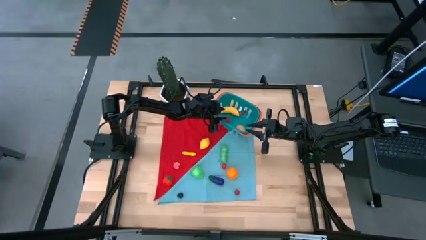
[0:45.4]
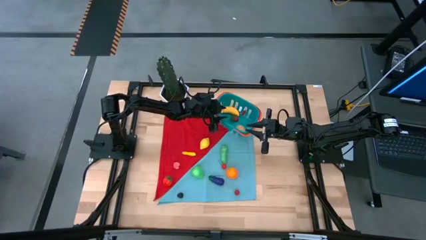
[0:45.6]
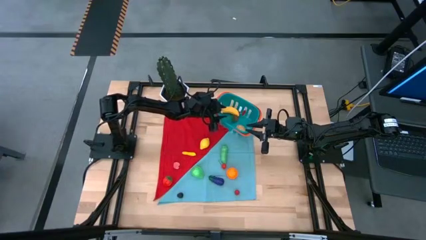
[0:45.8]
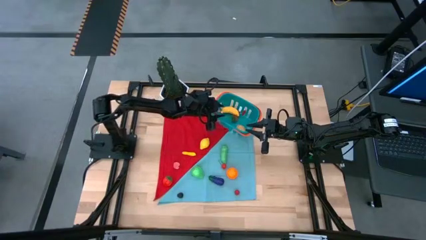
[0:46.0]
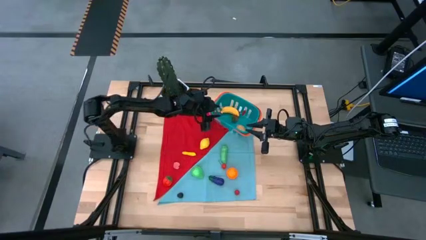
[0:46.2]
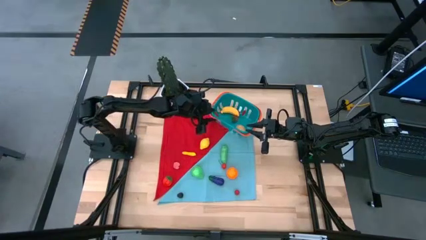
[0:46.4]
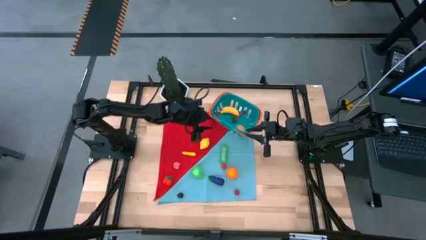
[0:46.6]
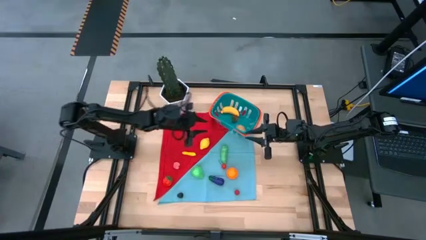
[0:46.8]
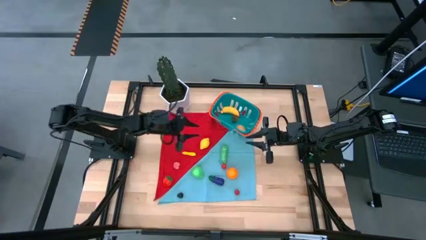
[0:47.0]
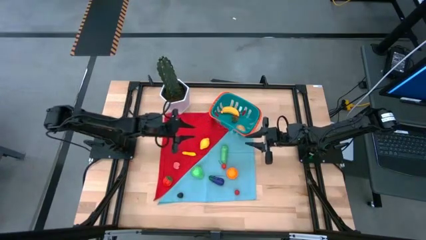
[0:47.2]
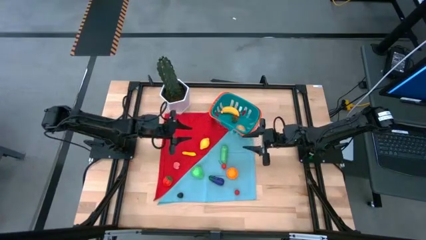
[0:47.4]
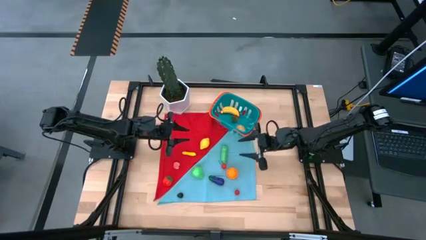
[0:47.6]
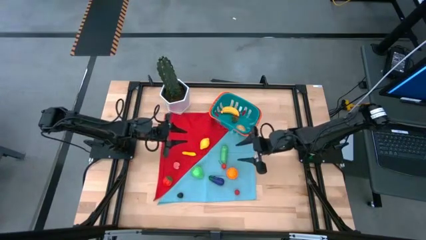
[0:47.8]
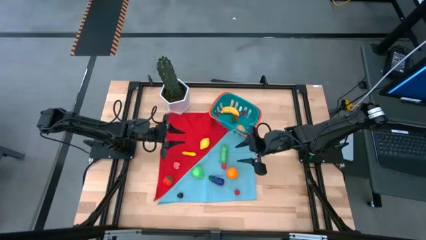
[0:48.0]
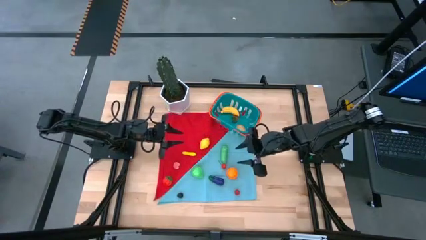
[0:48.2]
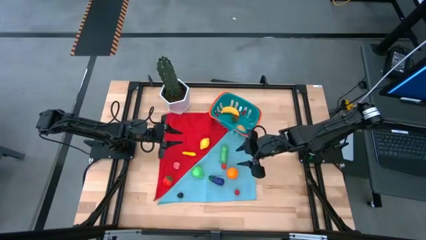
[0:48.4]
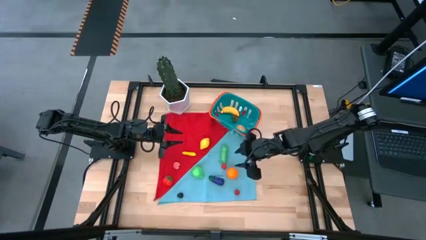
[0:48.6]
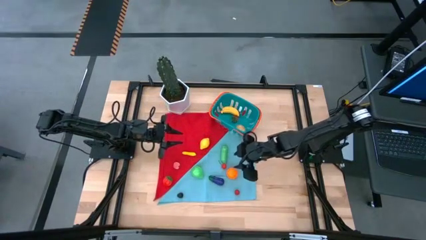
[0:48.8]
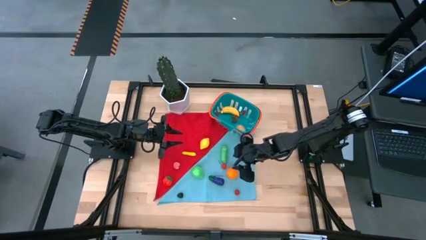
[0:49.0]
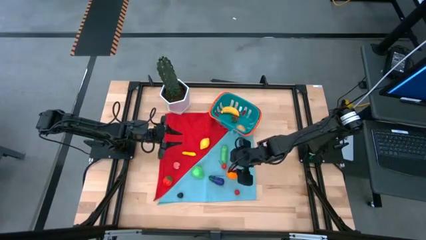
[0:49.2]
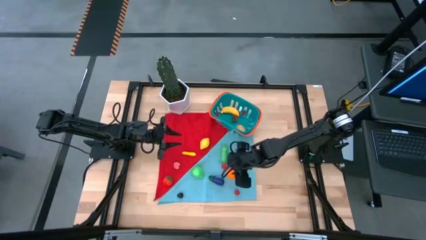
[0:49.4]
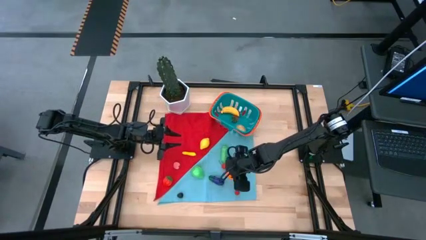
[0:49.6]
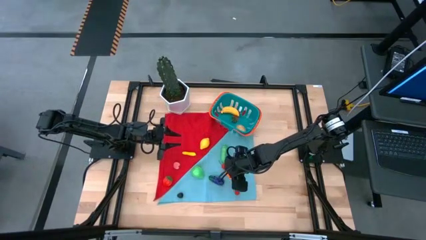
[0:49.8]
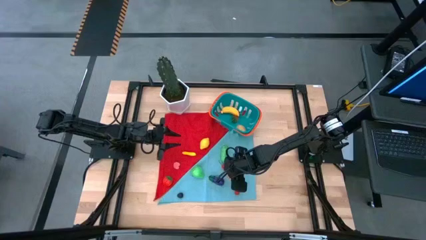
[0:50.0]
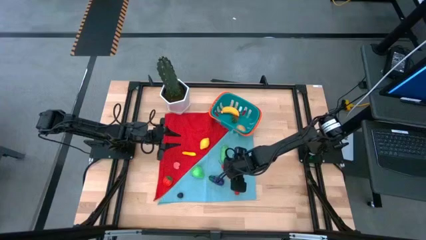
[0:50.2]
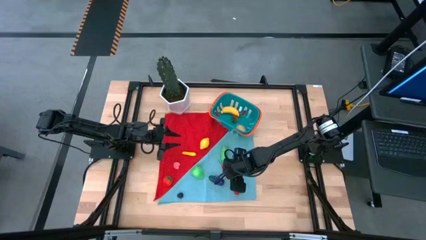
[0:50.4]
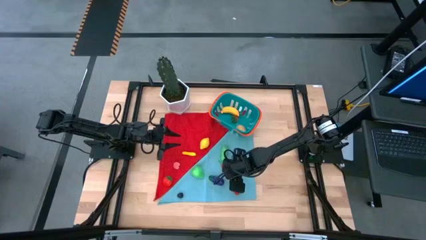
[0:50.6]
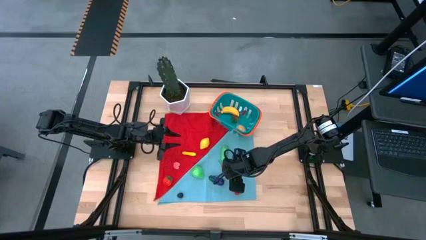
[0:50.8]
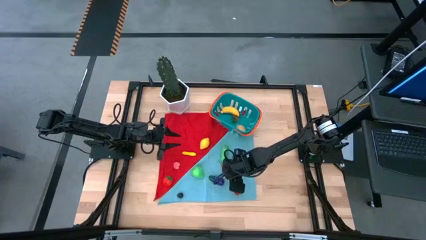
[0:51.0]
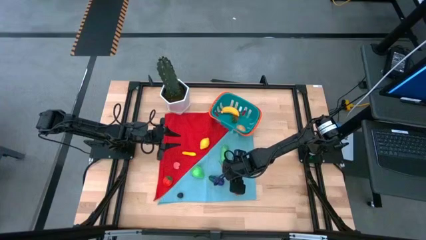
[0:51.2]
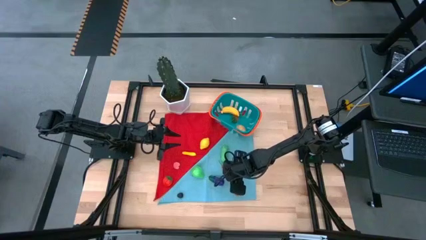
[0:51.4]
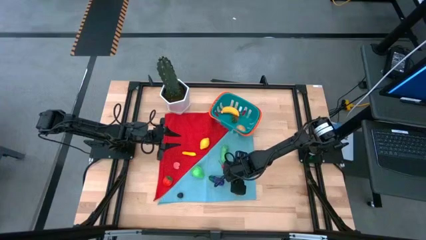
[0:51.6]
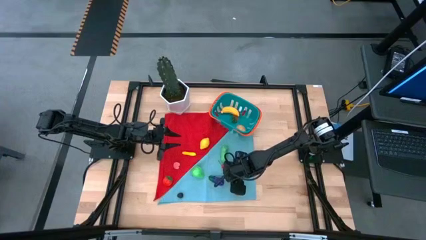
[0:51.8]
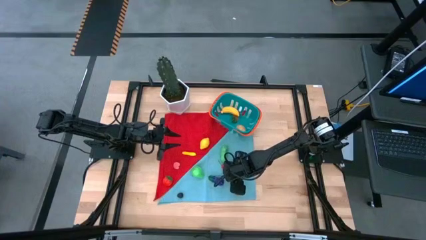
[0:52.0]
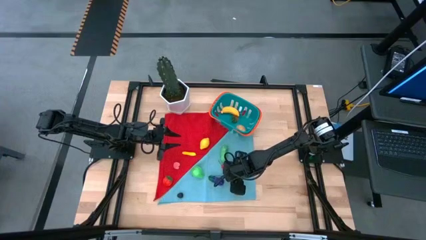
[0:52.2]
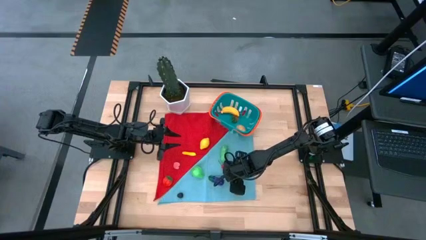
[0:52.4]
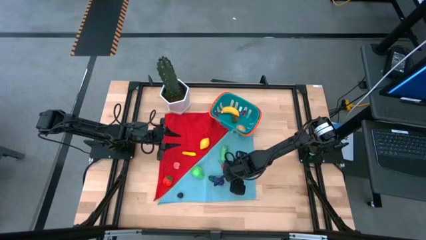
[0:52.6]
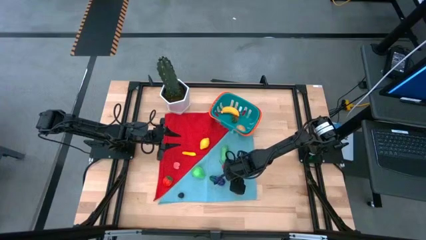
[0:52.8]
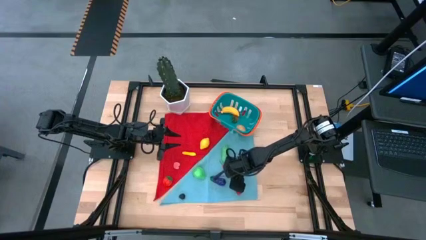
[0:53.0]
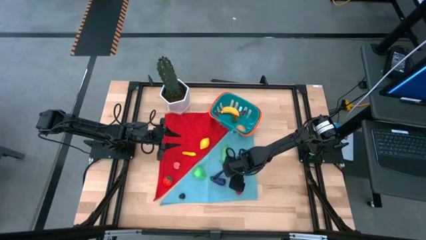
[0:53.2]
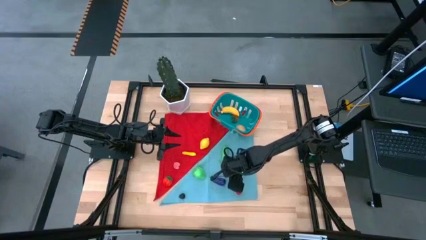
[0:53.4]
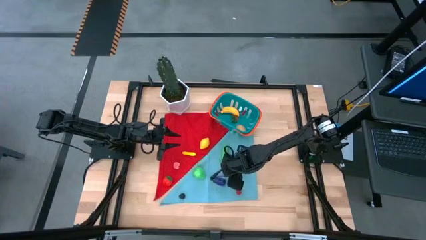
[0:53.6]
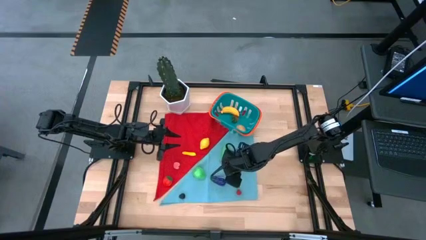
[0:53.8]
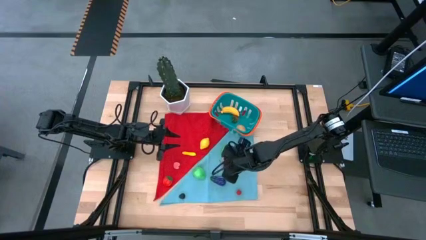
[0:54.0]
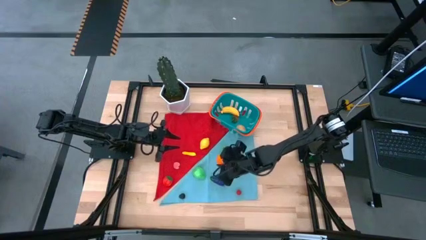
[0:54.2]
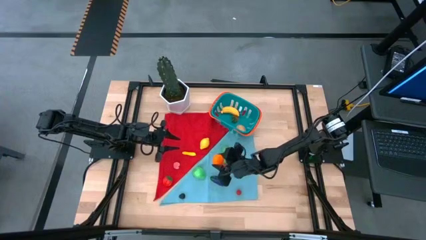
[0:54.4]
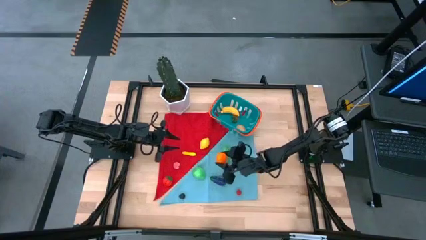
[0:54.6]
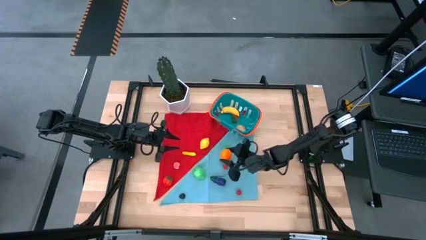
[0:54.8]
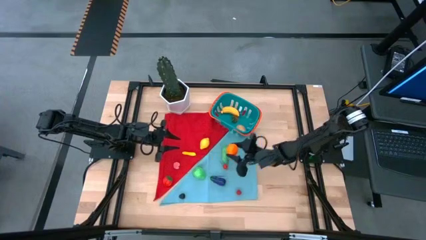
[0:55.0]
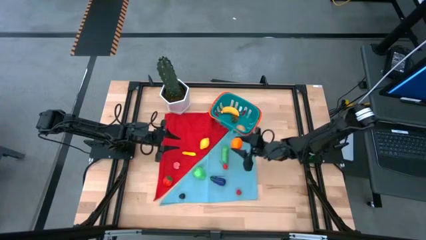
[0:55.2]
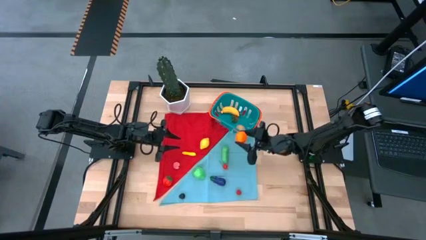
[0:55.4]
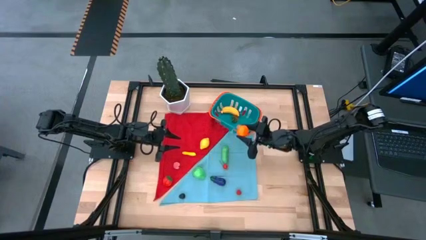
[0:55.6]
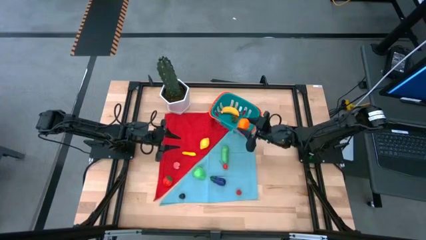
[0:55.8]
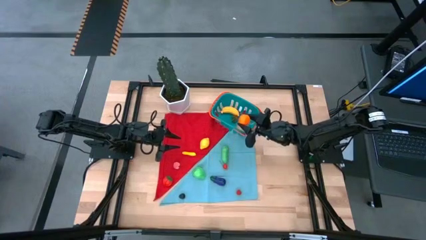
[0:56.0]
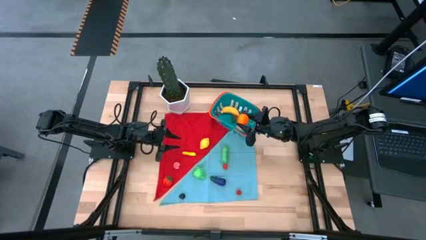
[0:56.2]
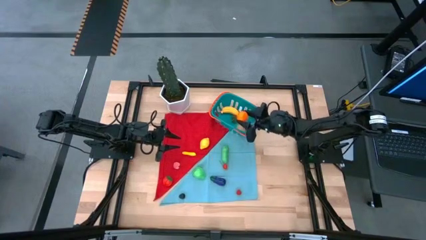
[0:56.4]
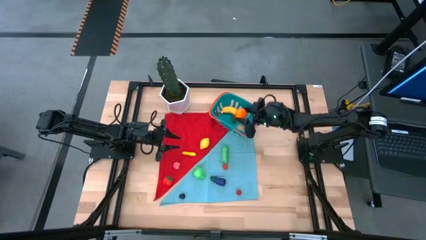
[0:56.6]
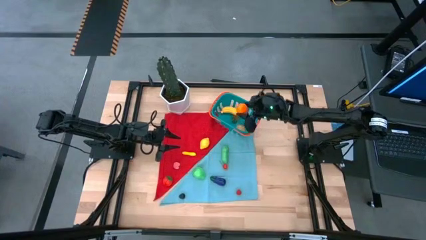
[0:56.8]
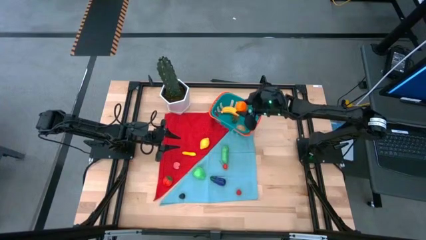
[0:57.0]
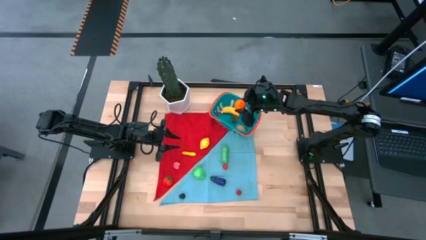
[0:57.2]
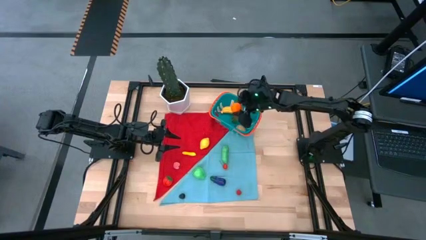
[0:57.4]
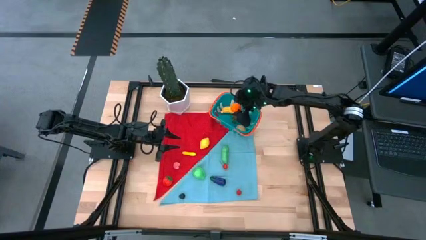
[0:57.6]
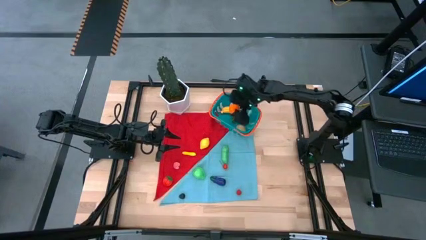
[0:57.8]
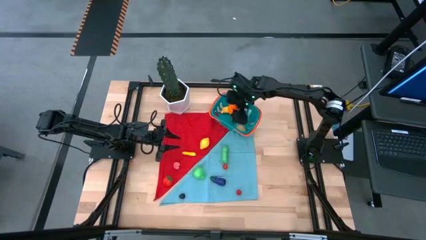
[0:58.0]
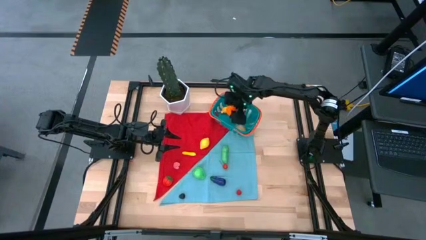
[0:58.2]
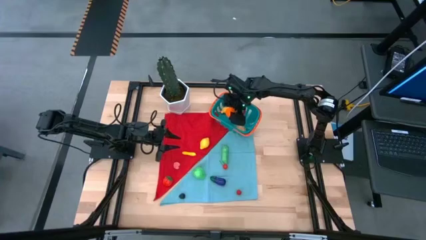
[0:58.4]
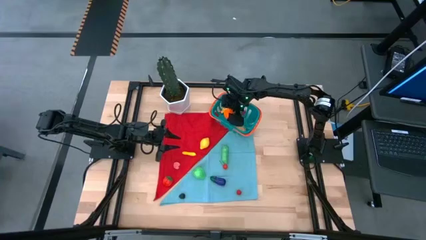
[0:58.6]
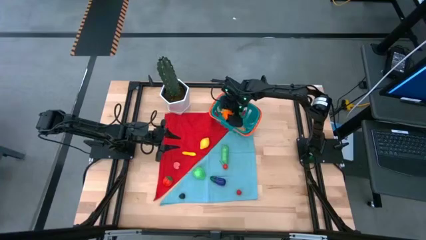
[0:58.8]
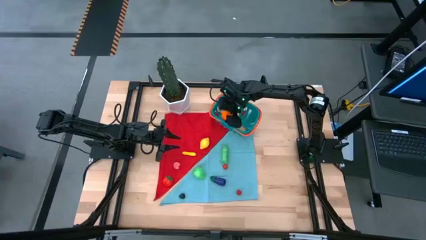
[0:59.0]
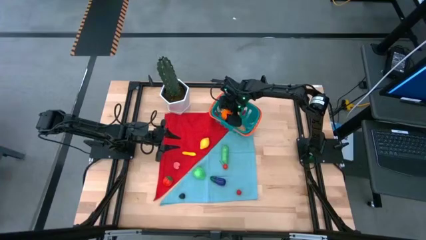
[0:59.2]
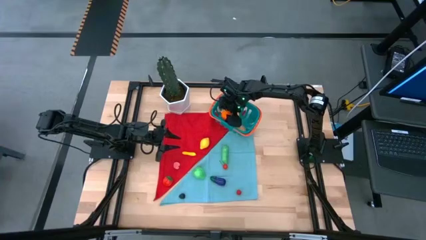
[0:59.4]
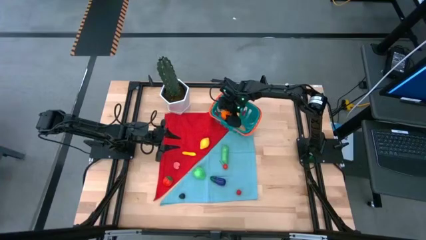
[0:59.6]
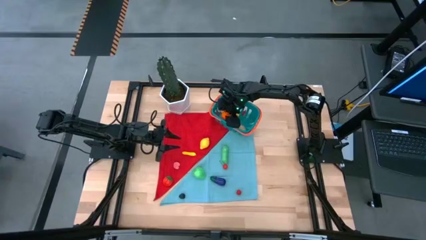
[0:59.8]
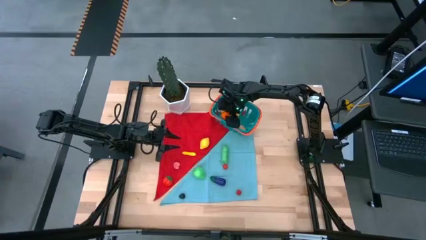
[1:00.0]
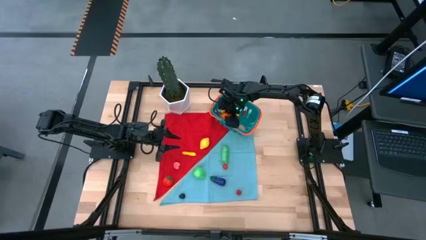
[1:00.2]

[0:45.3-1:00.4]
Task: Pick and placing Produce into tupperware
Put the orange pumpkin into the blue basket
